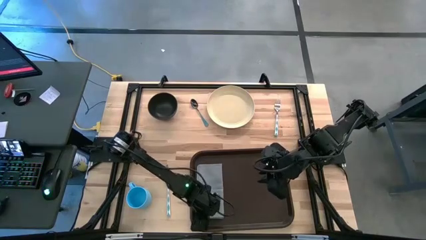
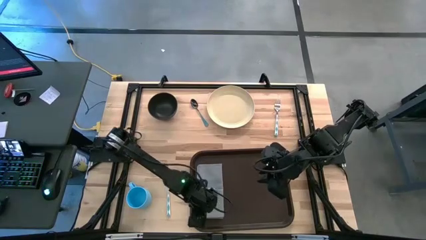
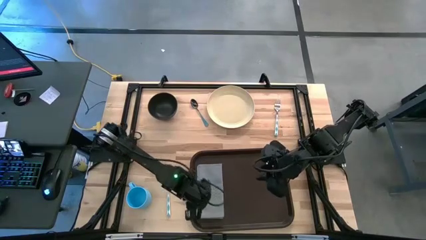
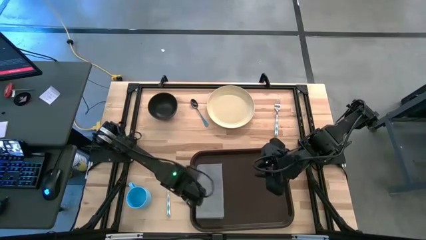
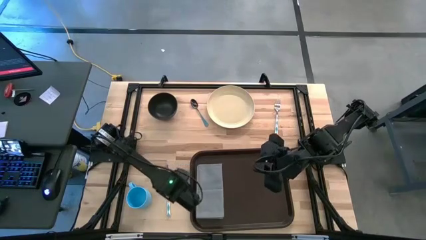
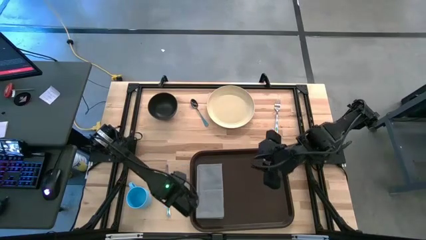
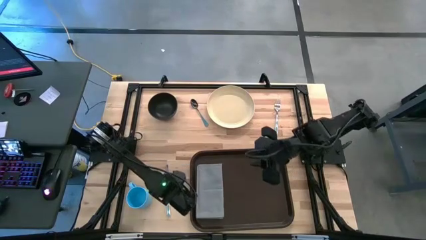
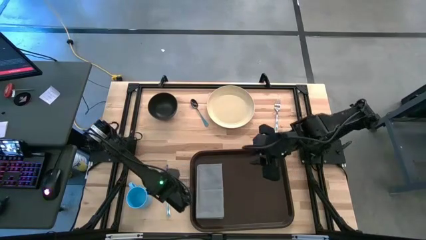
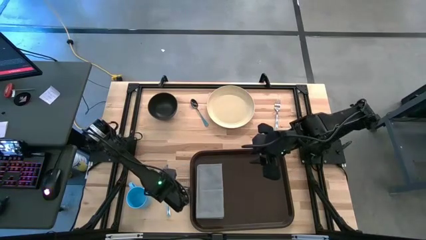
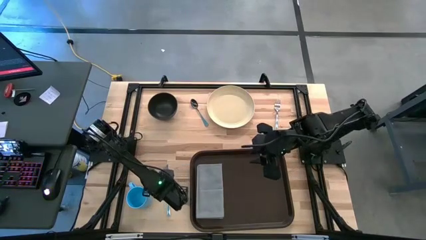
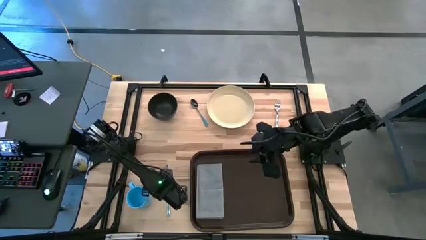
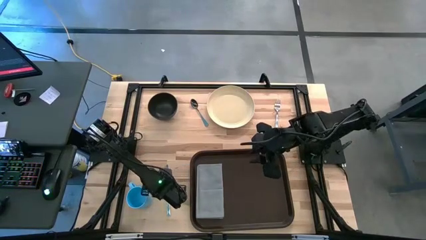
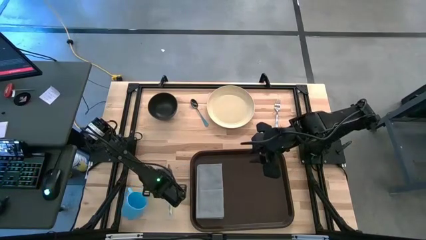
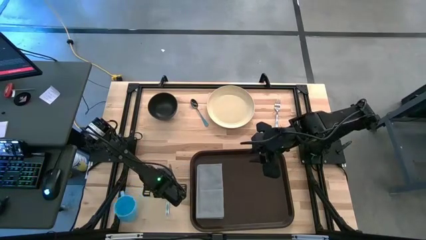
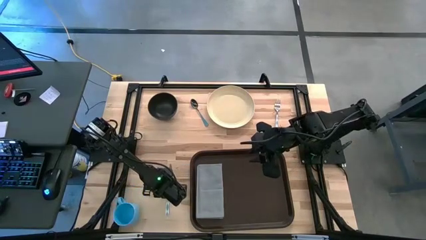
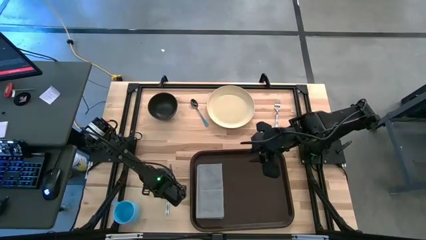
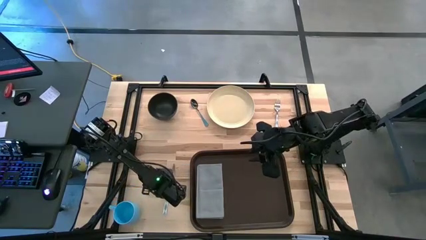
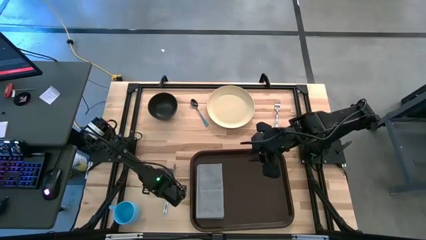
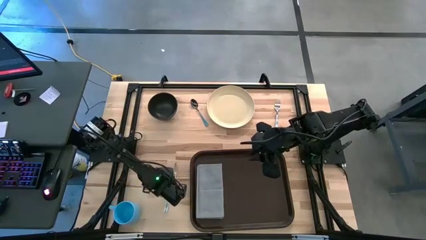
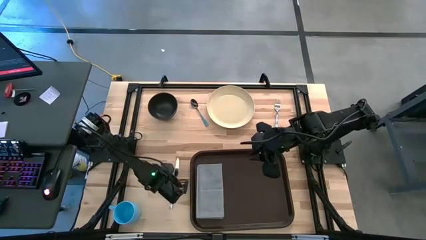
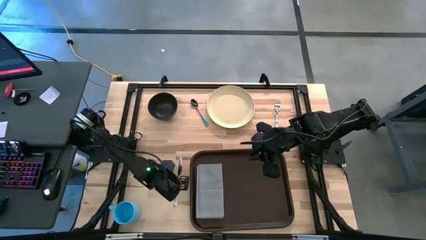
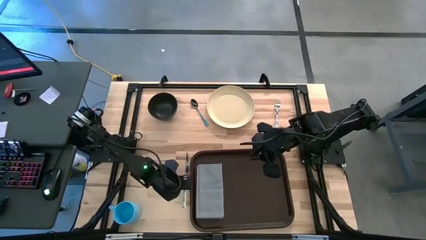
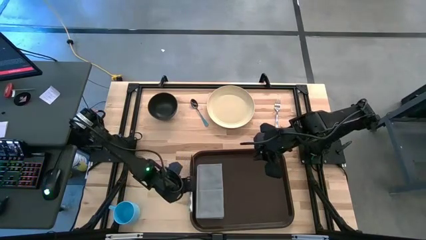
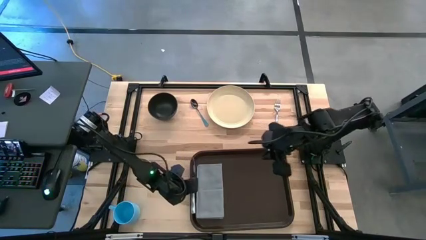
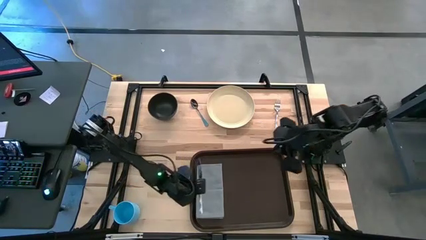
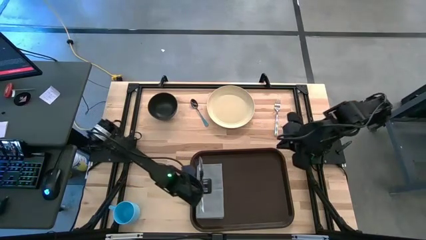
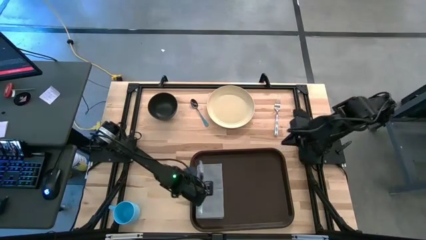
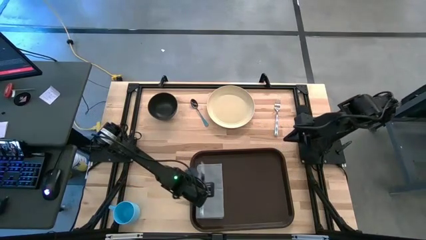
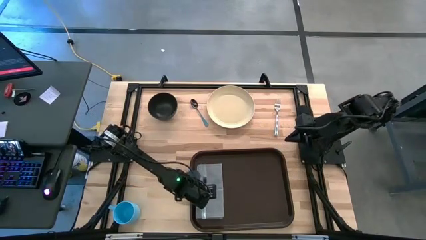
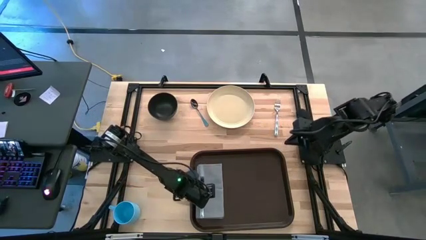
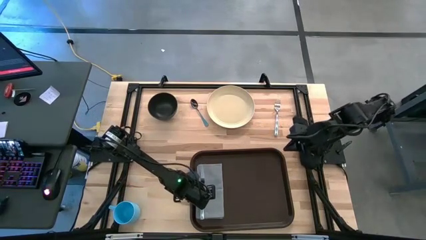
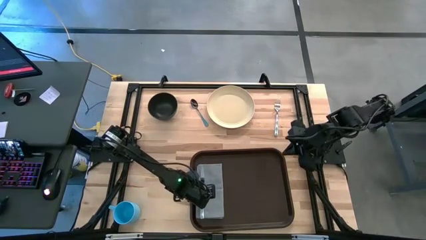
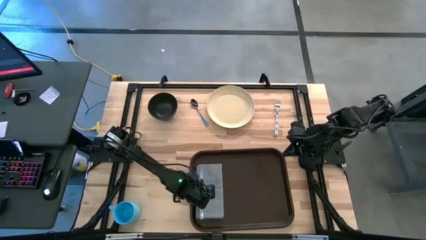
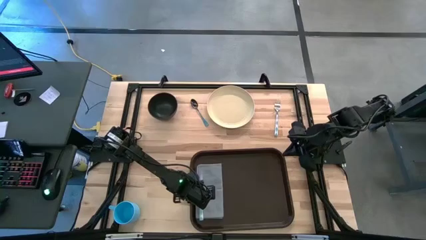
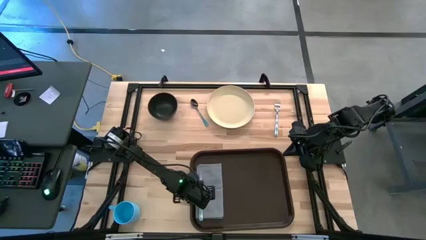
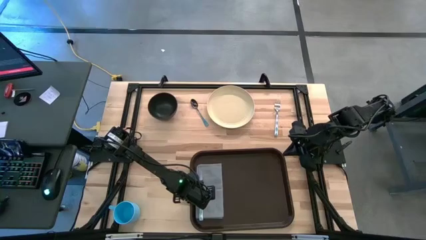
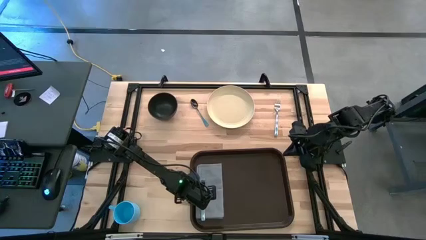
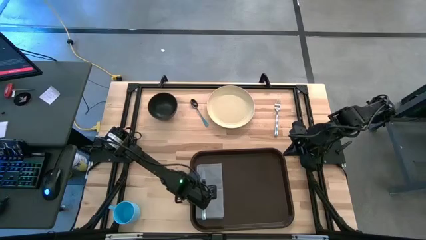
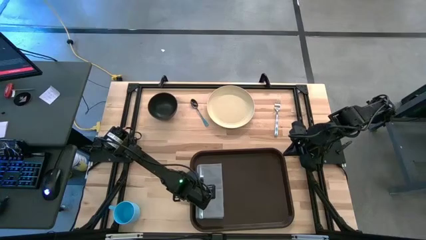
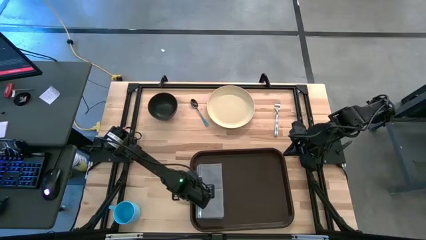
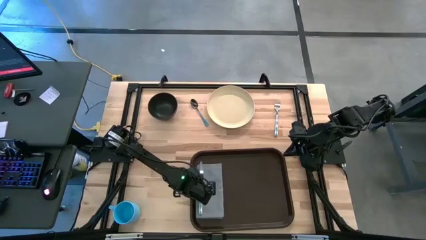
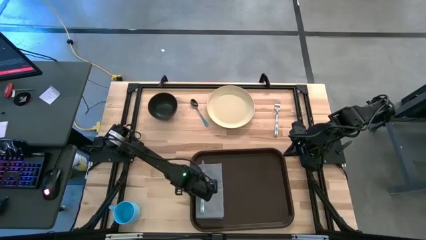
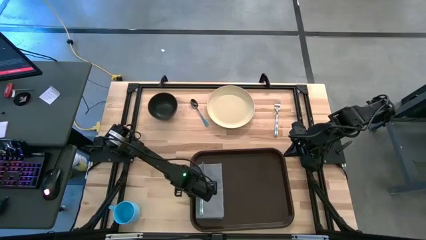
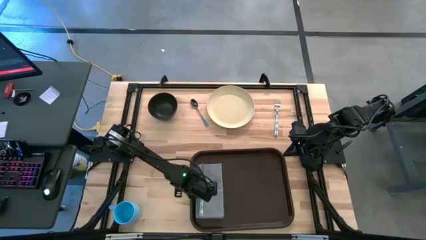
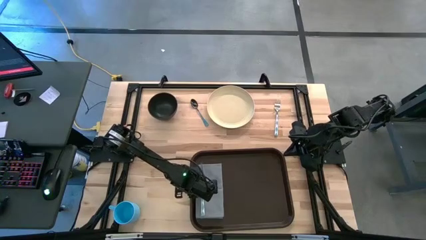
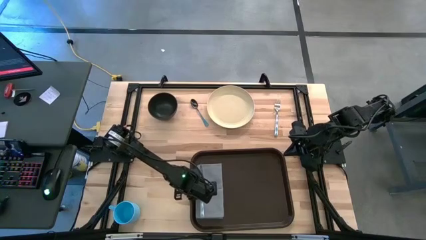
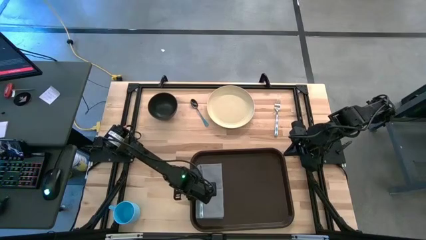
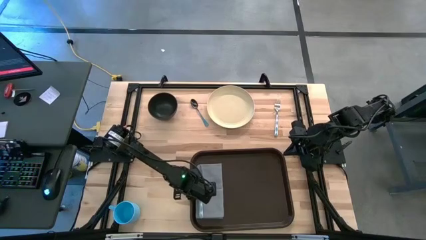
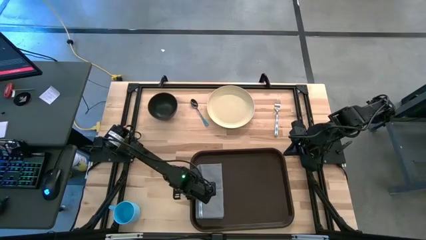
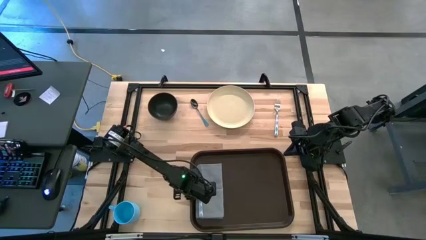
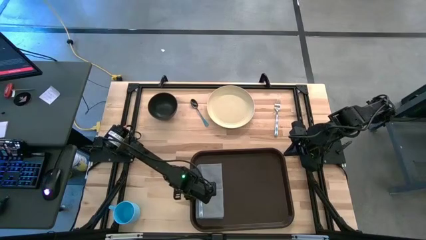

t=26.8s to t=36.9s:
Task: Set up tray
Put the white knife on the gray table napkin
